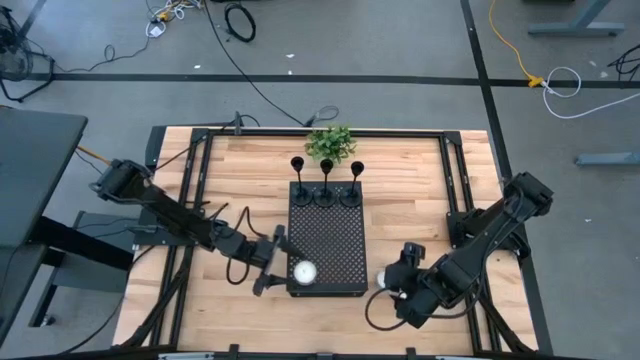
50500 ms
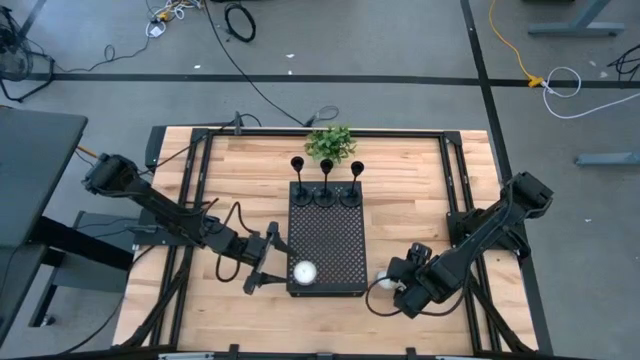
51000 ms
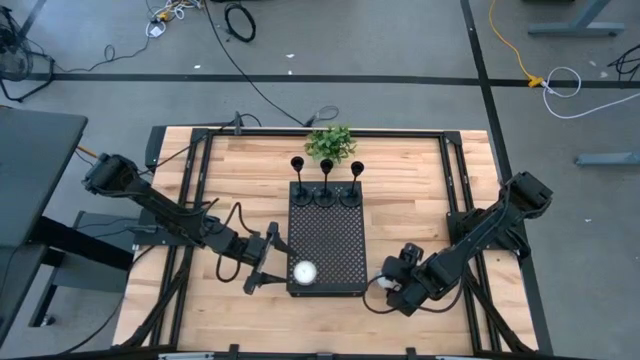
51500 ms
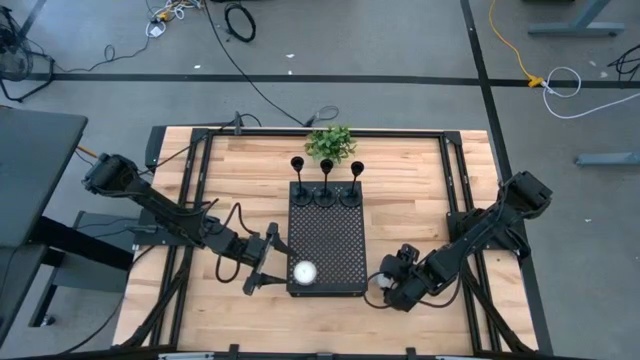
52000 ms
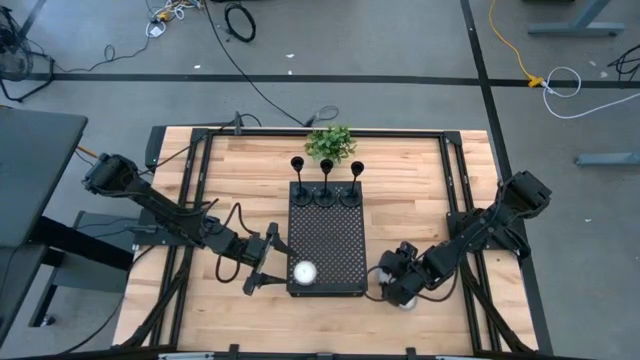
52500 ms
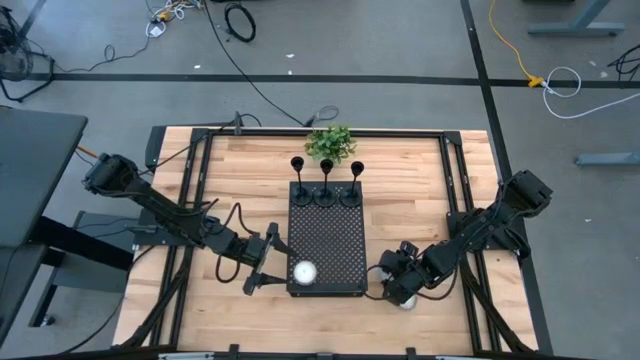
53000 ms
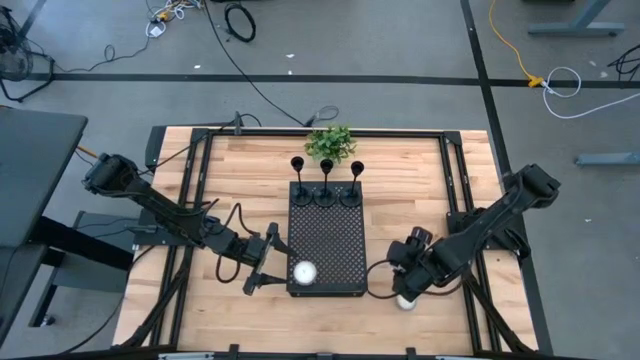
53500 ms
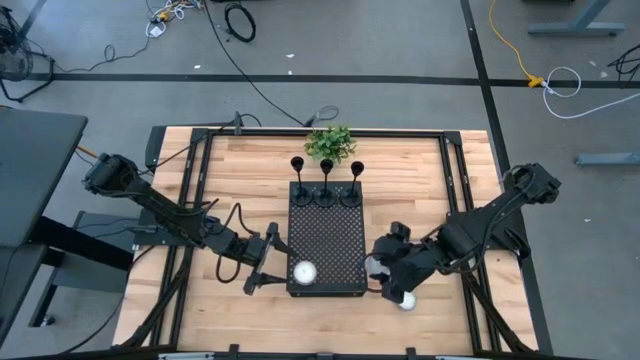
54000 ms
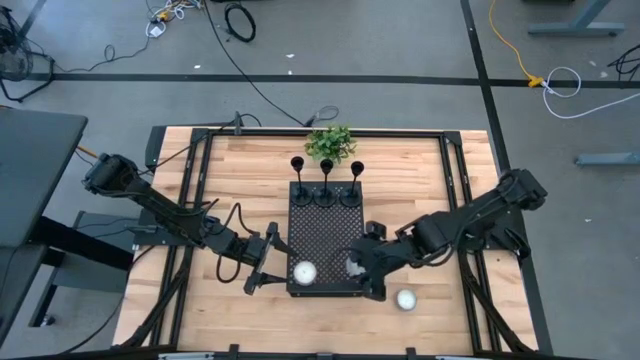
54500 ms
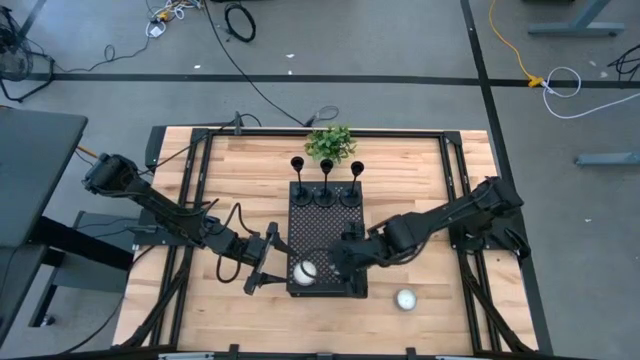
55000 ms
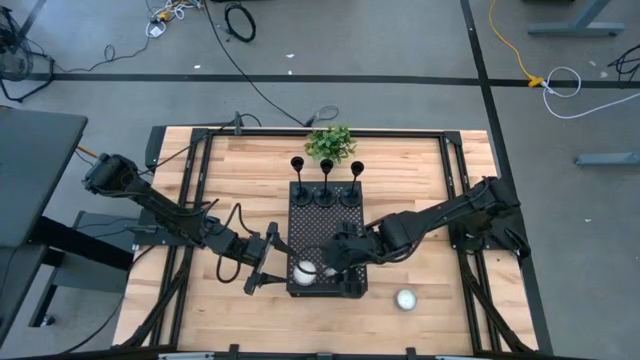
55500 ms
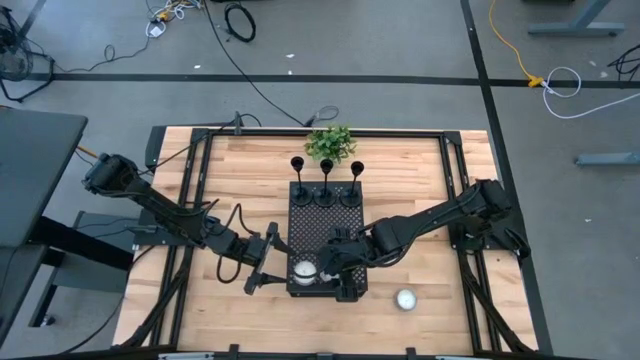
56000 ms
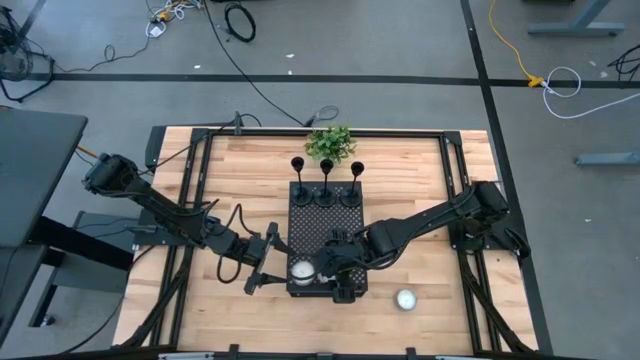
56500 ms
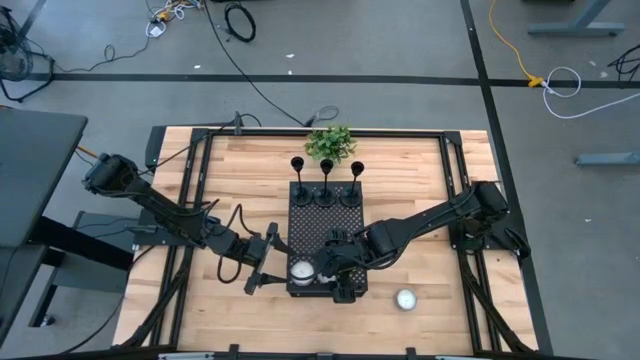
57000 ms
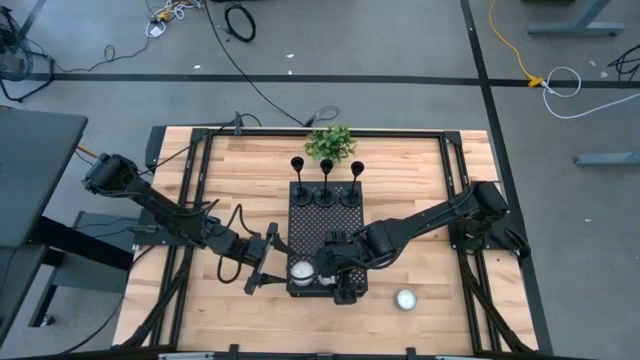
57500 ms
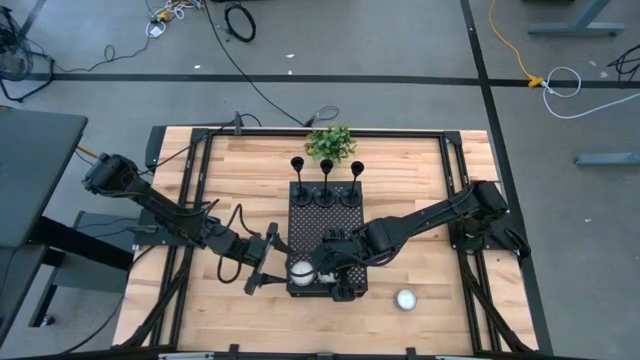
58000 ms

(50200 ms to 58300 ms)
Task: Pick & Place candle stick holders
Put the violet candle on the shelf

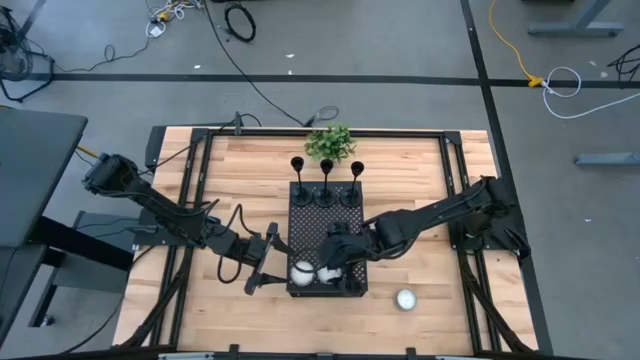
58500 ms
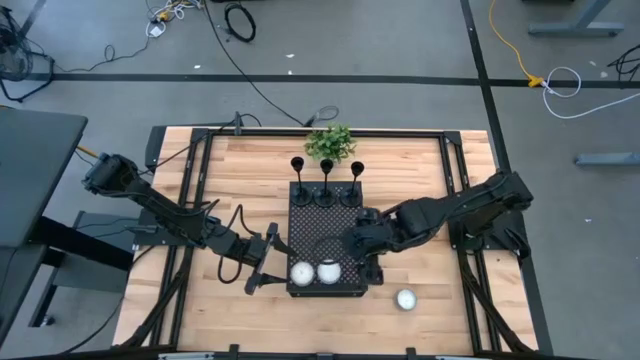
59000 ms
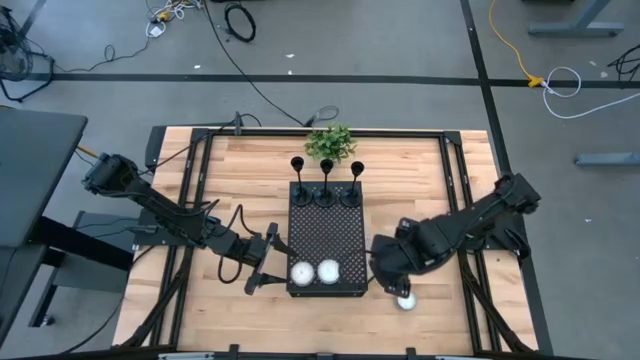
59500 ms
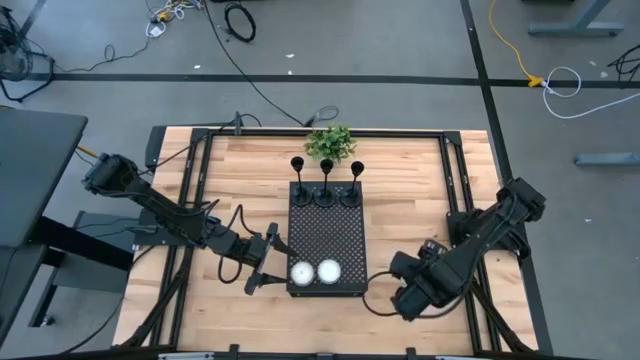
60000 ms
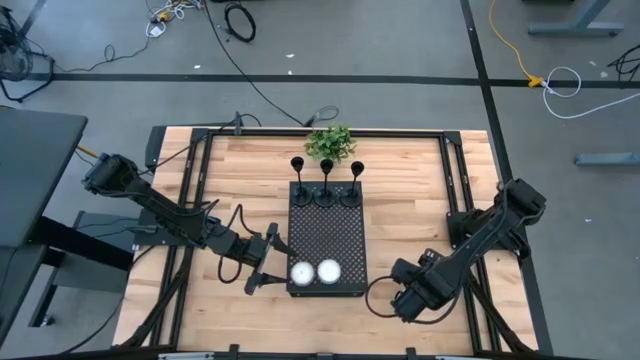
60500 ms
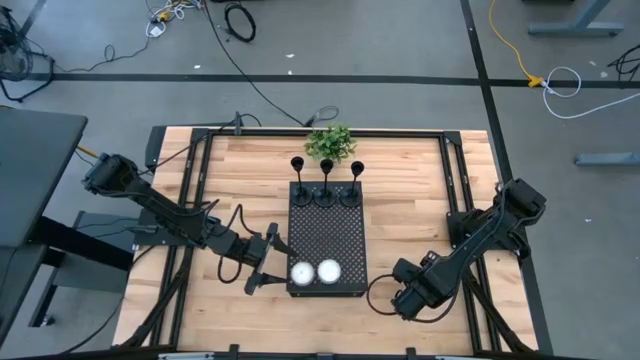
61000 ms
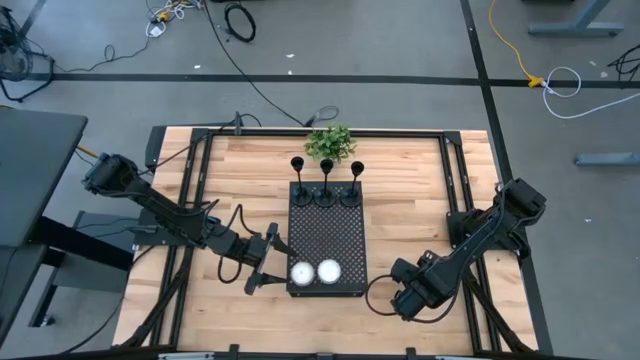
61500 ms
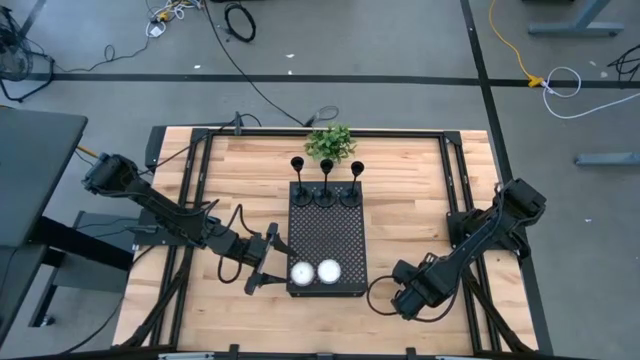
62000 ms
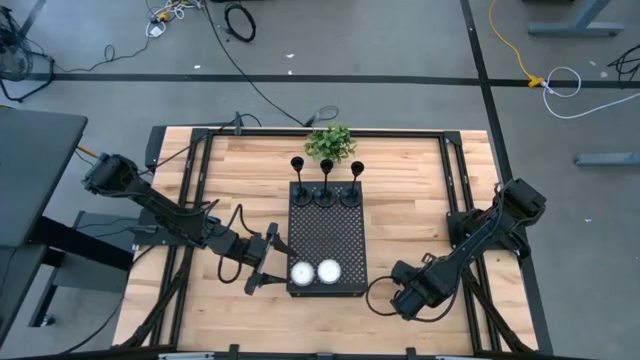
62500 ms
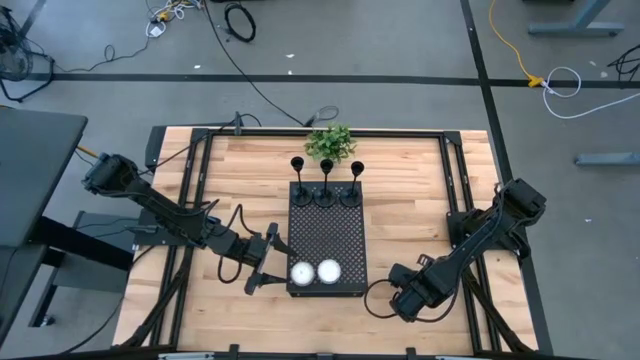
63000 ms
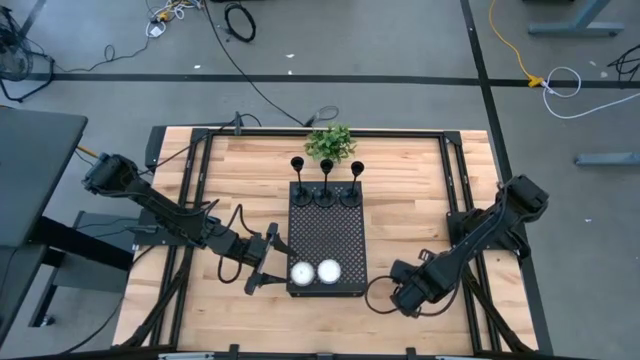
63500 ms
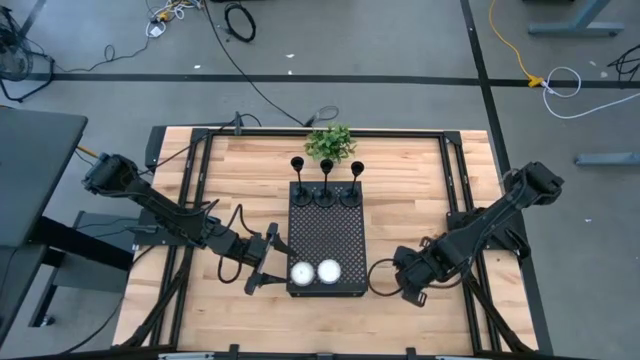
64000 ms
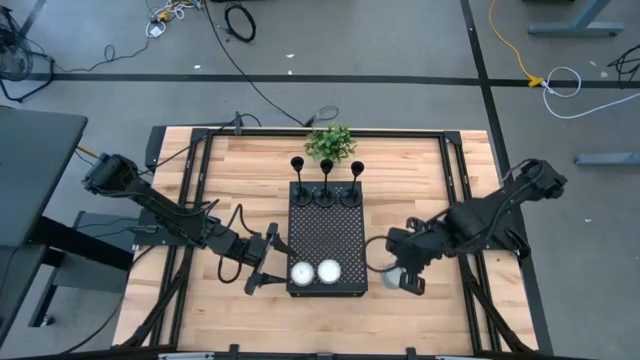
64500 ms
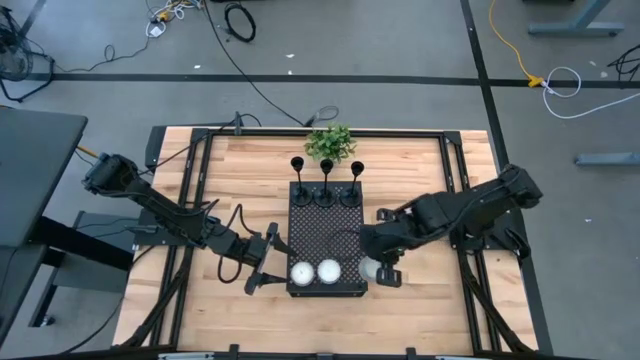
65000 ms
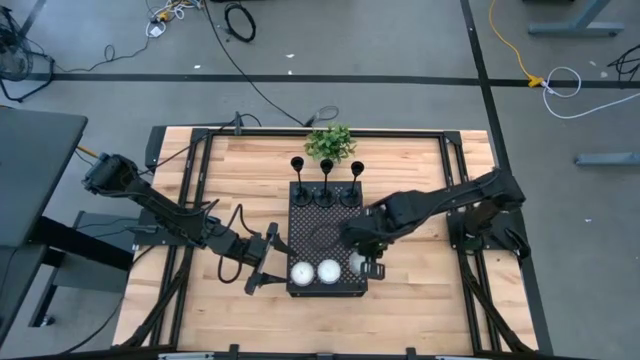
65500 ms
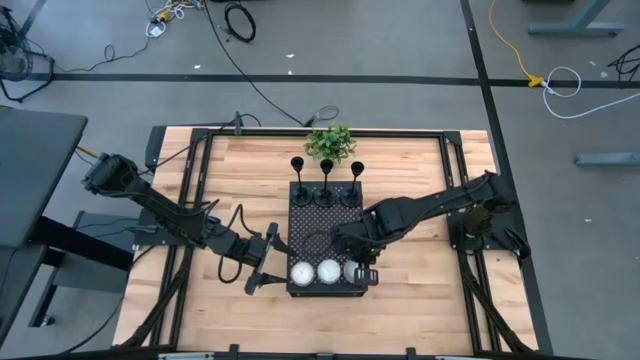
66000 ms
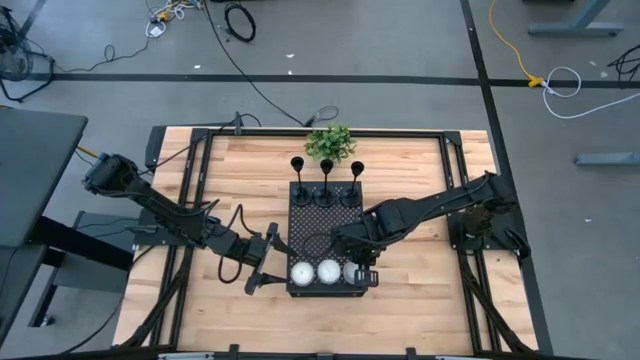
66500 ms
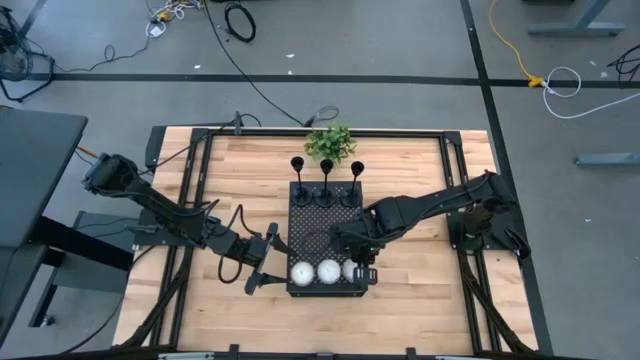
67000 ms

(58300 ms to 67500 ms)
Put the blue candle on the shelf

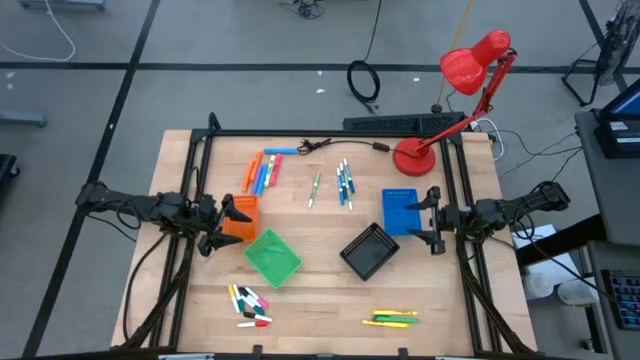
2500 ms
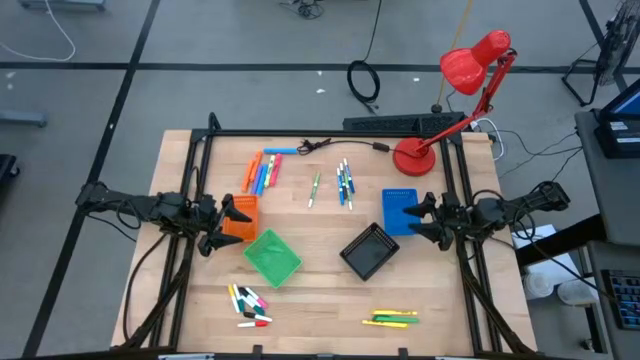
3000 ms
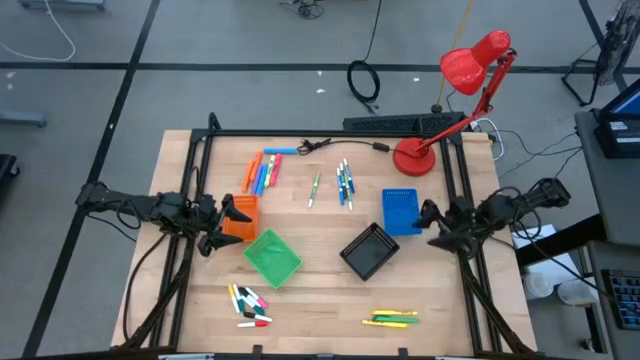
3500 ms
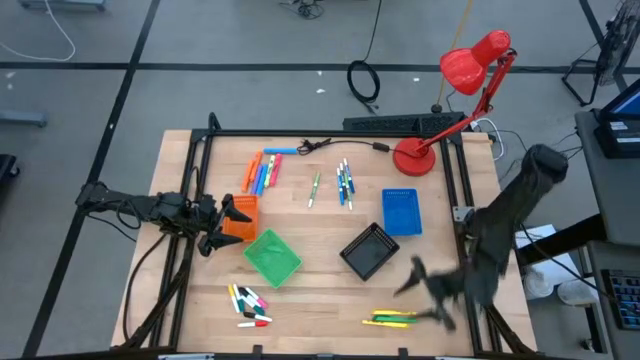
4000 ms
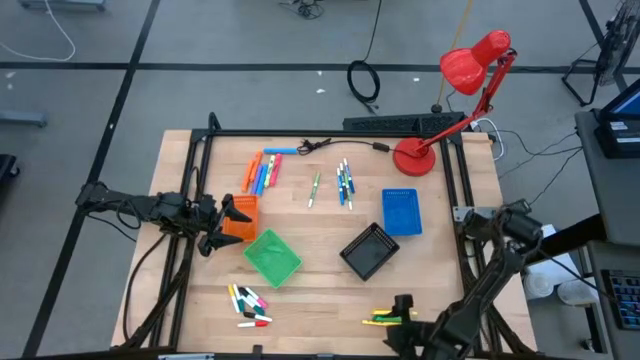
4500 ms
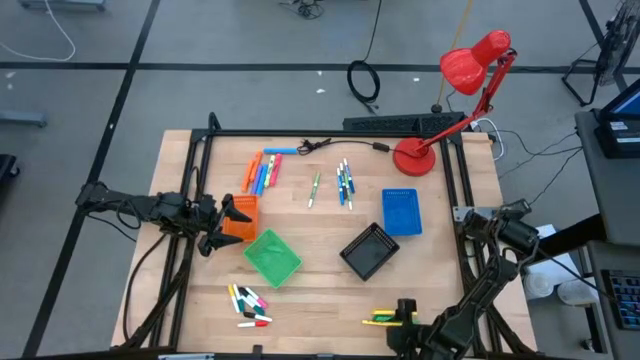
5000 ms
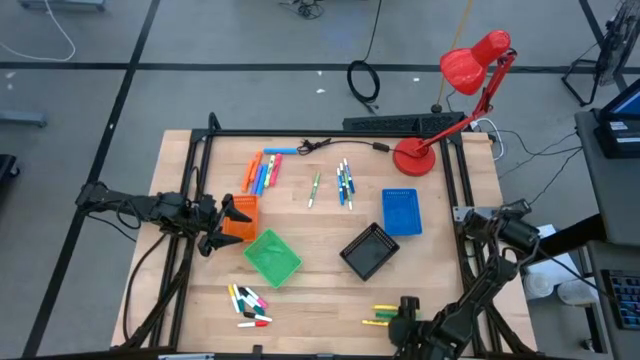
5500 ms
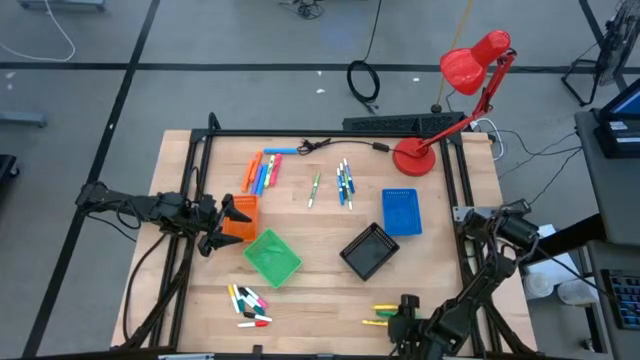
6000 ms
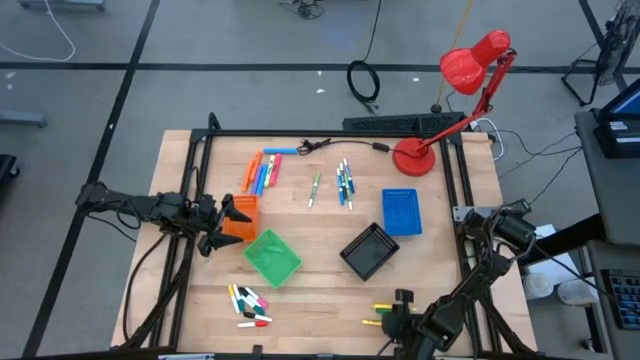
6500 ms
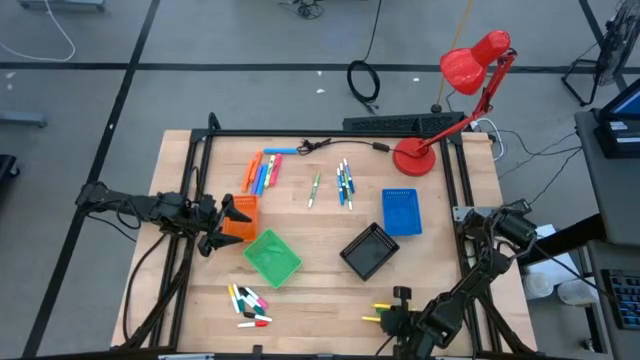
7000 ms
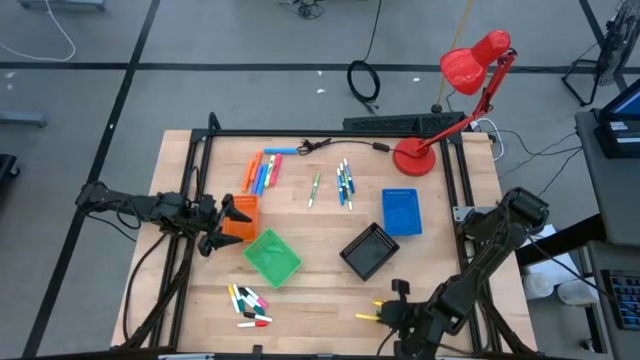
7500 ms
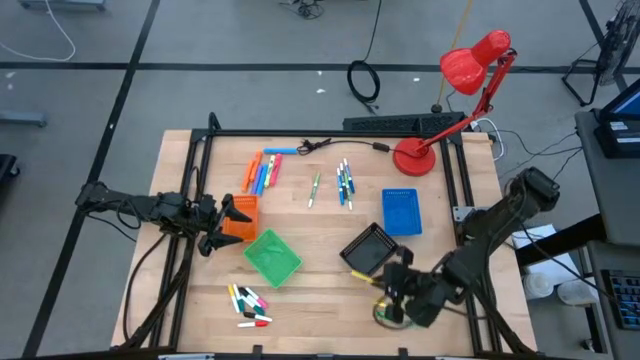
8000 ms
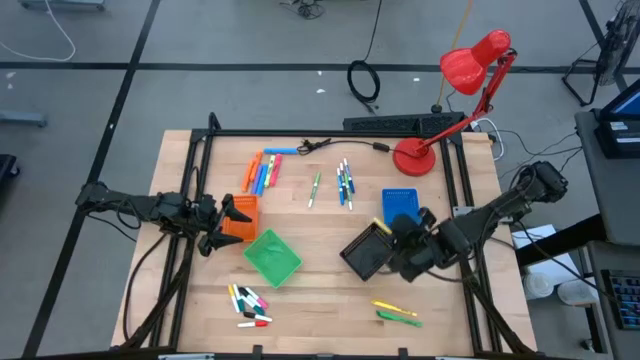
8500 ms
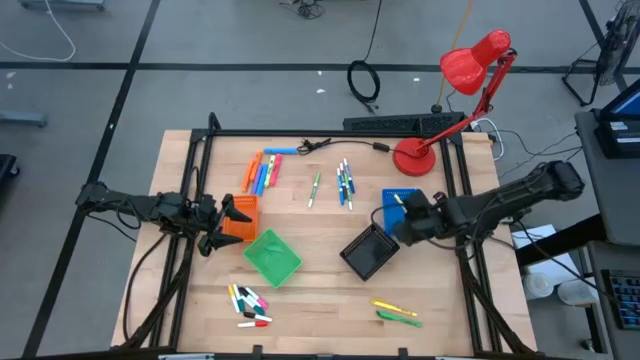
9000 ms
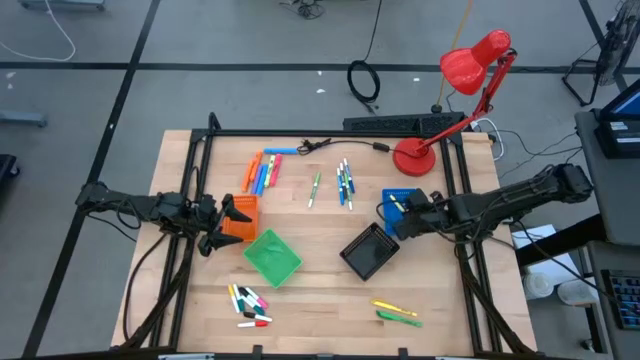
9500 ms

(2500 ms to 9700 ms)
Task: Pick & Place Markers
Put the bottom yellow pen into the blue basket
